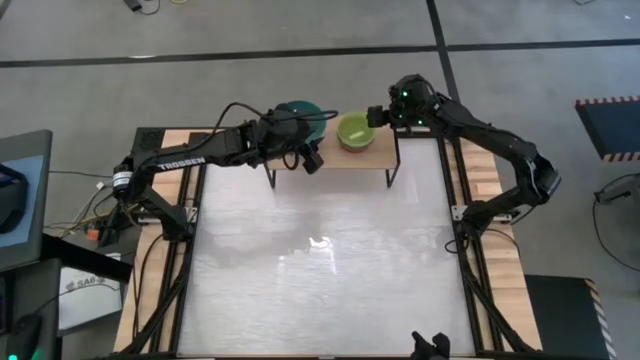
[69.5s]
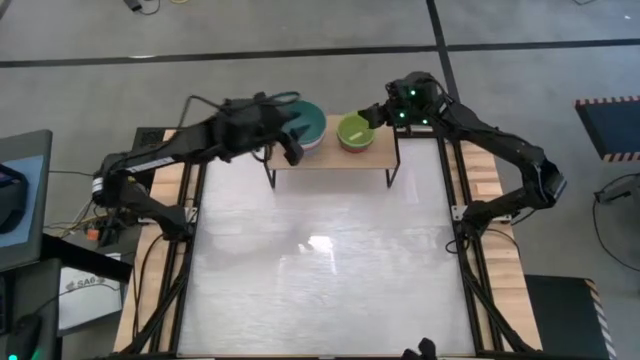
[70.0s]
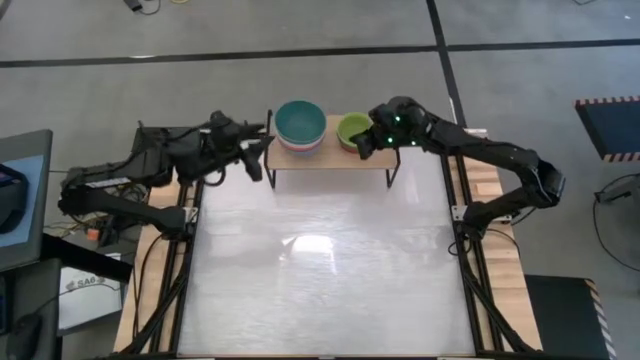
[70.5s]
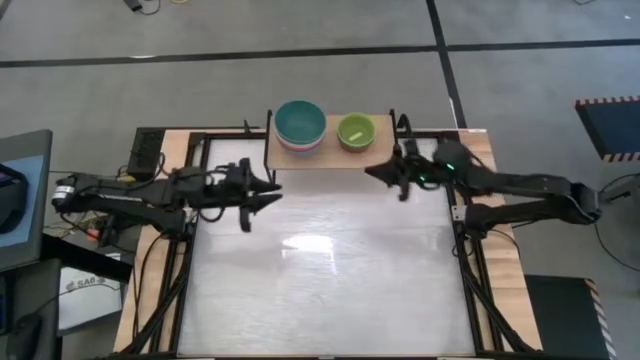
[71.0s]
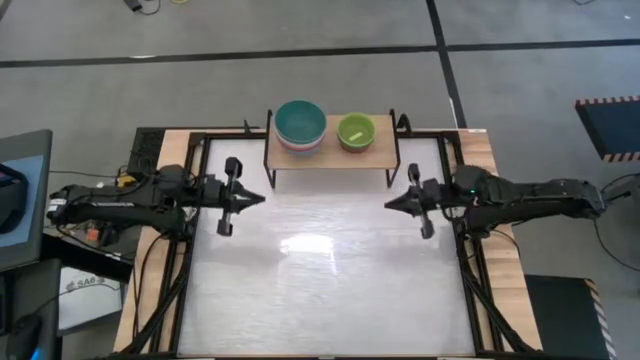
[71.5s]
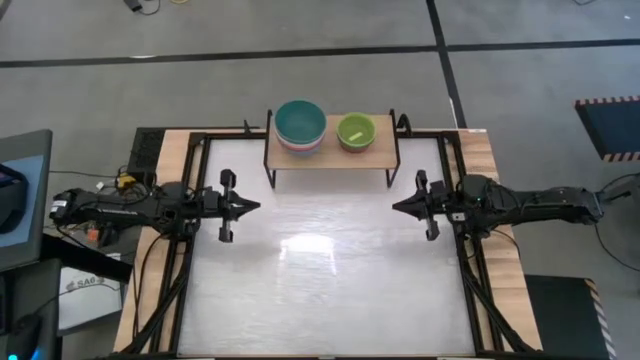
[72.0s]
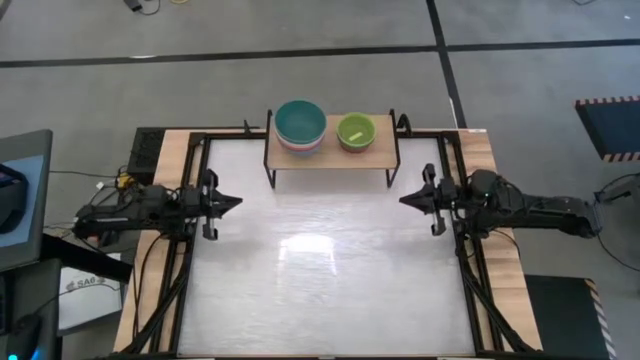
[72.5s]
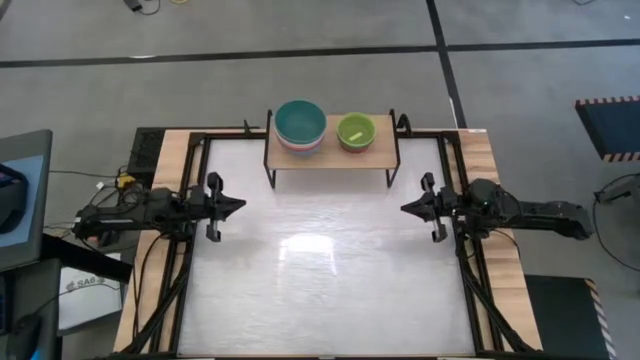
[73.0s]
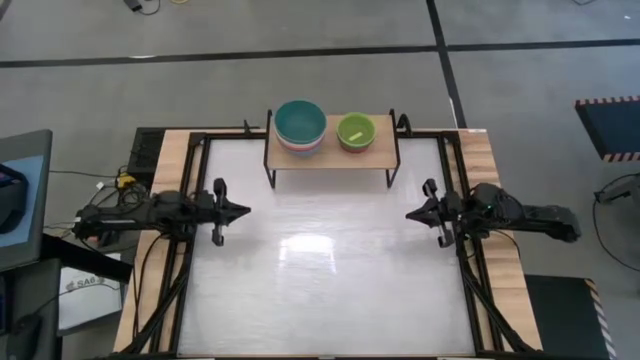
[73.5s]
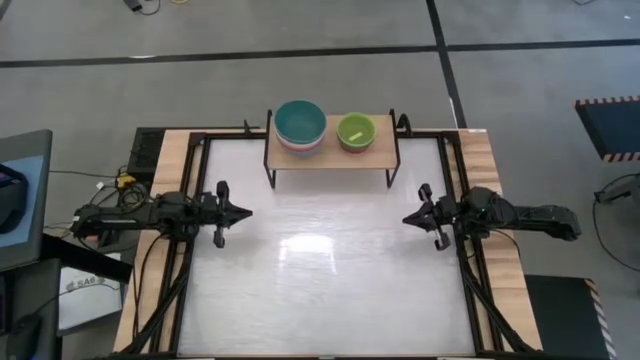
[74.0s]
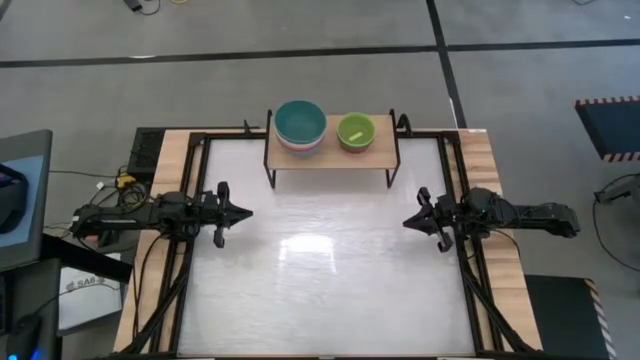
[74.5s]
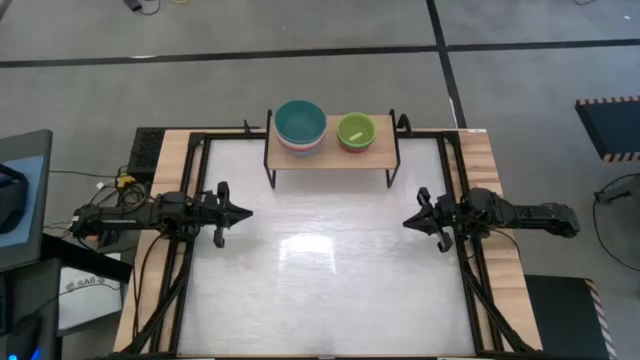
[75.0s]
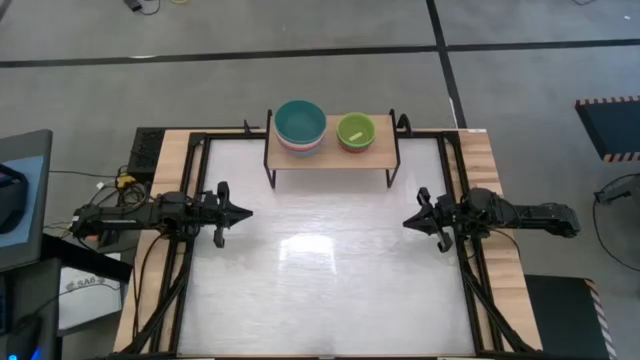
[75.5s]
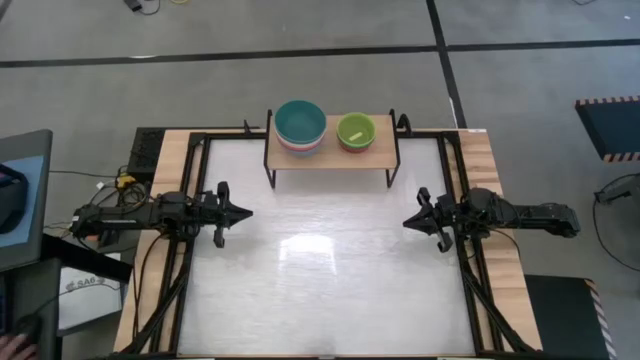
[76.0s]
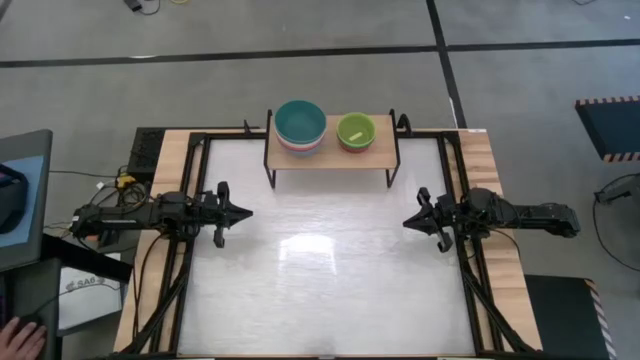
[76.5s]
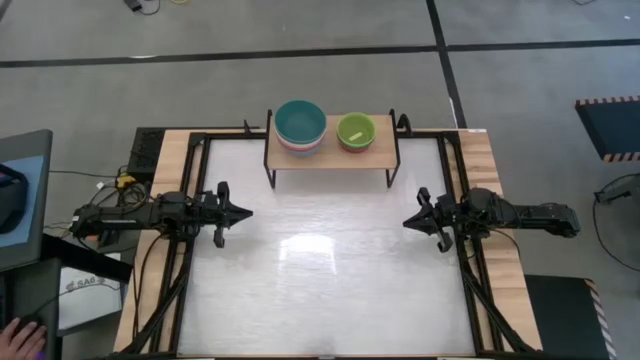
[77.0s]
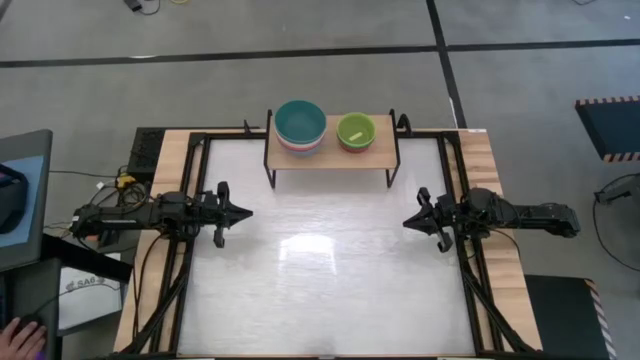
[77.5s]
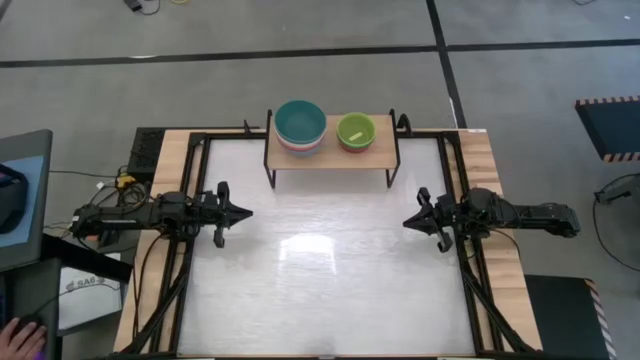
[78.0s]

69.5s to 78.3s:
Task: Place and stack bowls onto a shelf
Return to Home Position

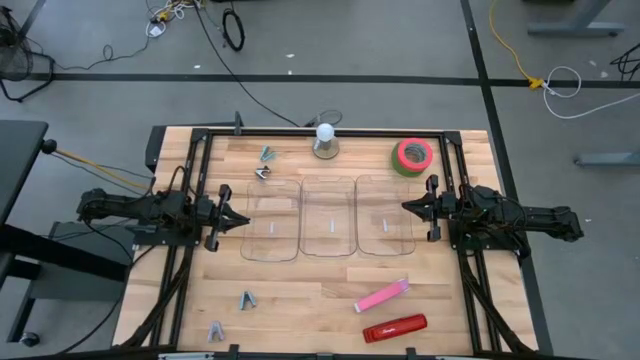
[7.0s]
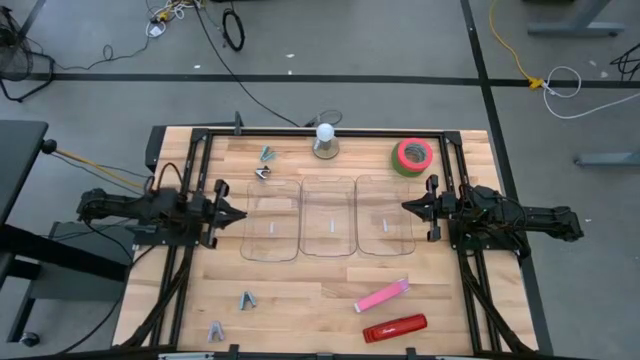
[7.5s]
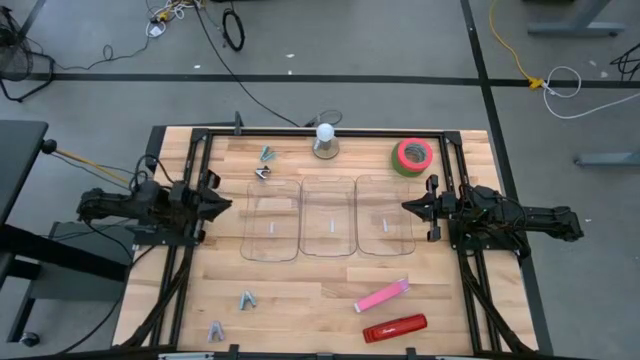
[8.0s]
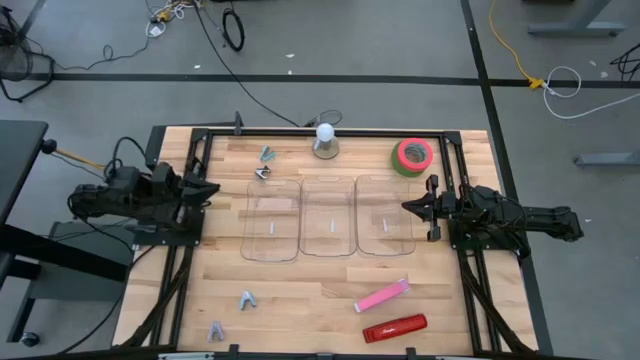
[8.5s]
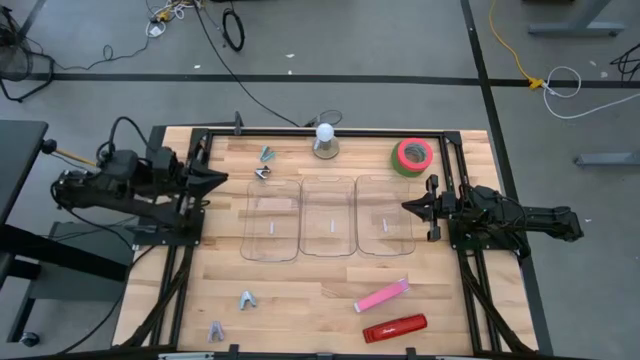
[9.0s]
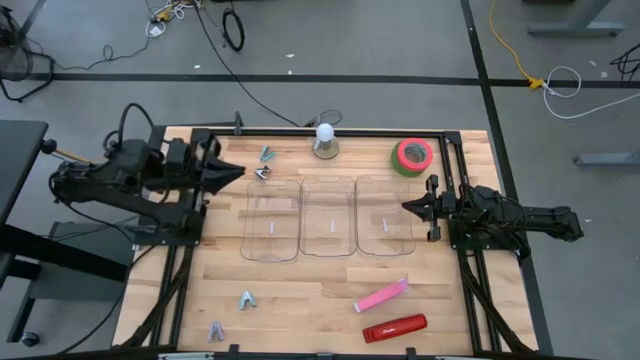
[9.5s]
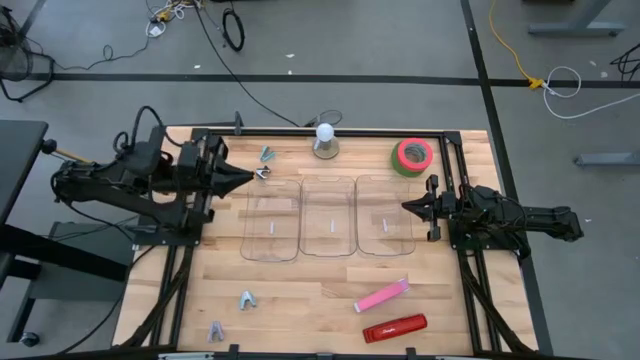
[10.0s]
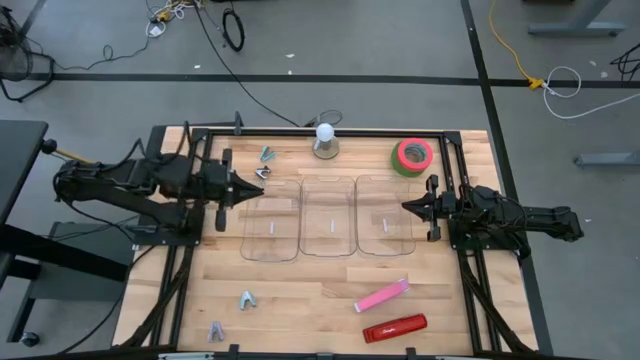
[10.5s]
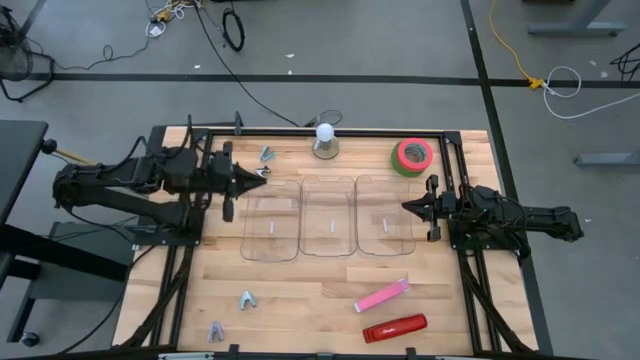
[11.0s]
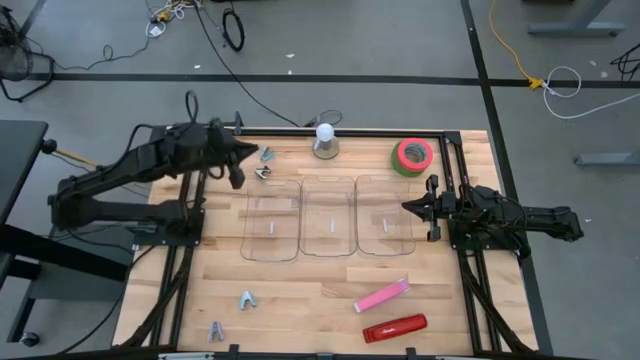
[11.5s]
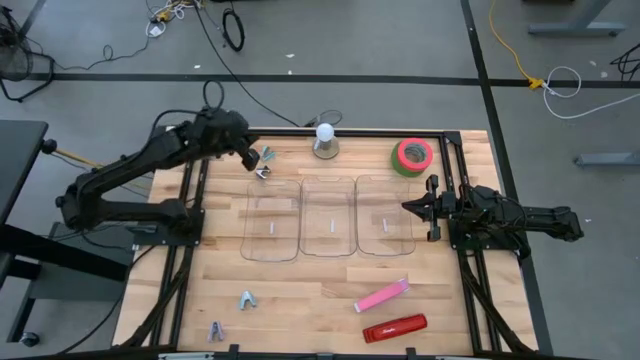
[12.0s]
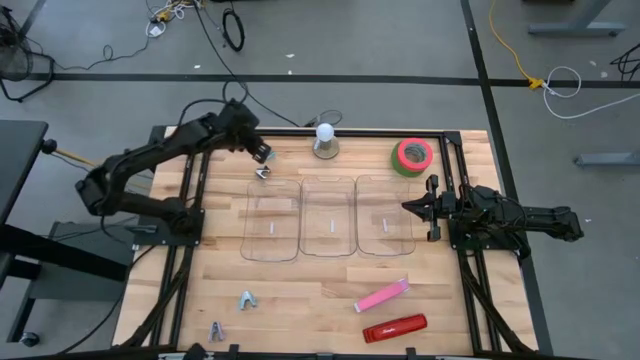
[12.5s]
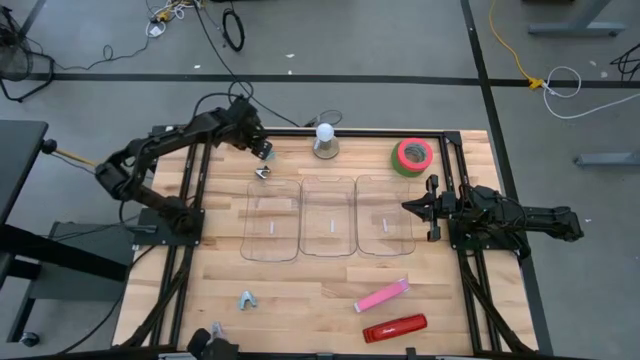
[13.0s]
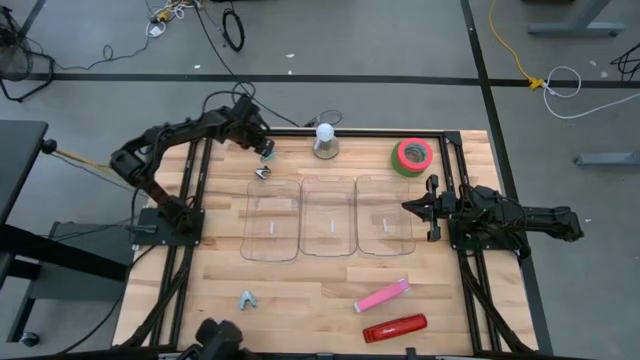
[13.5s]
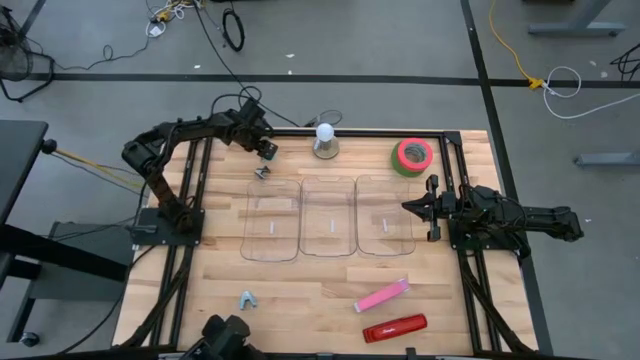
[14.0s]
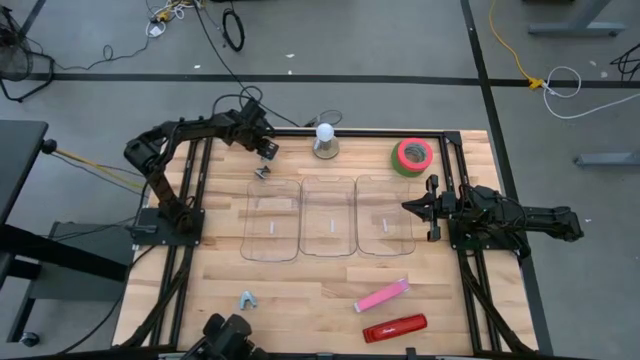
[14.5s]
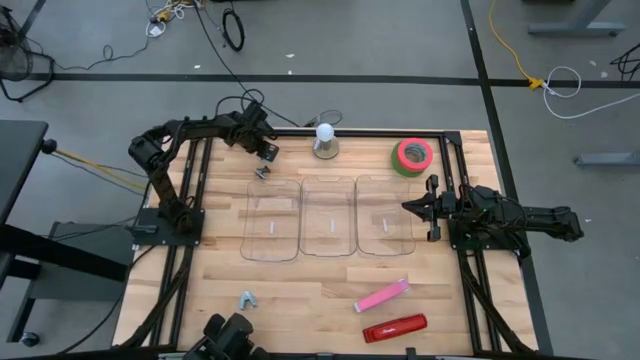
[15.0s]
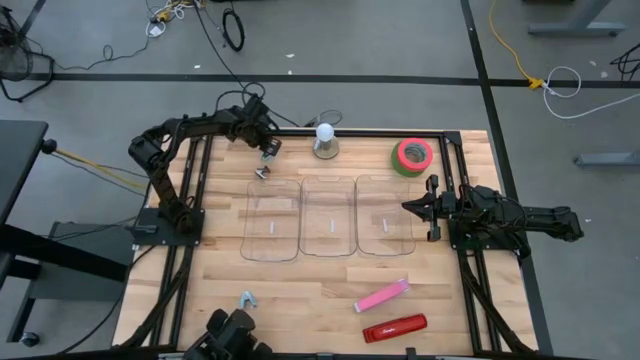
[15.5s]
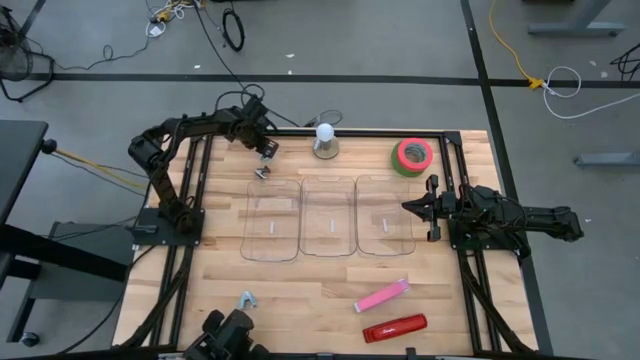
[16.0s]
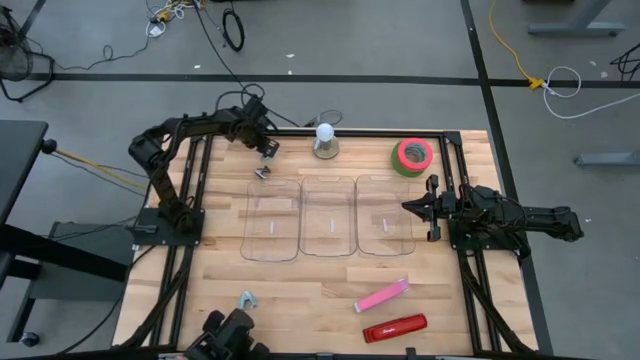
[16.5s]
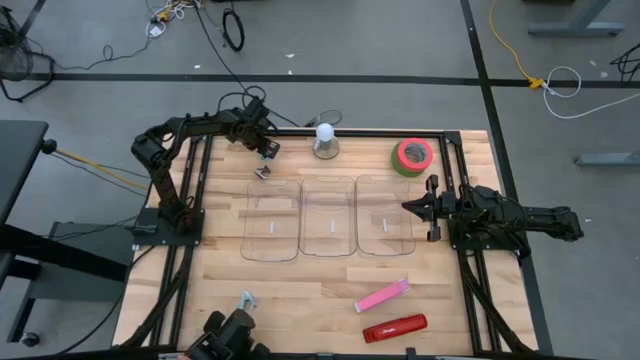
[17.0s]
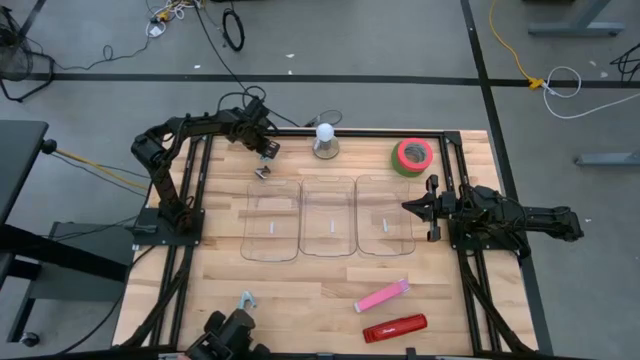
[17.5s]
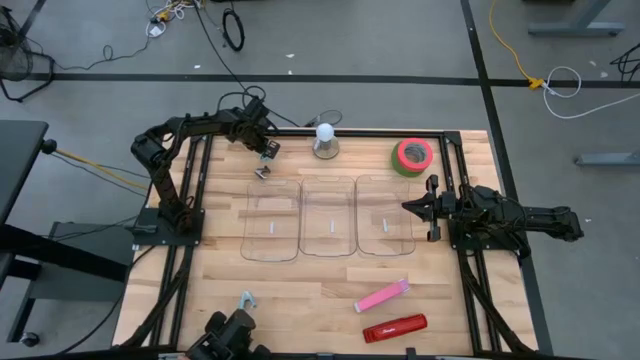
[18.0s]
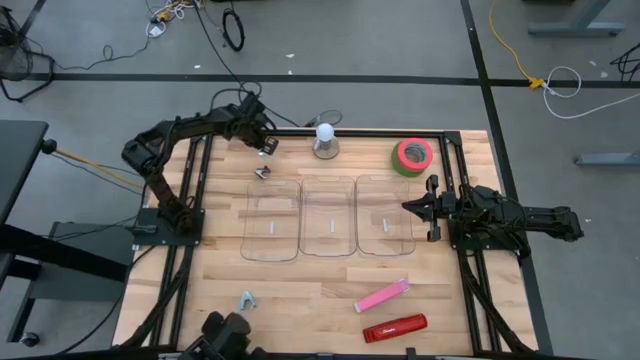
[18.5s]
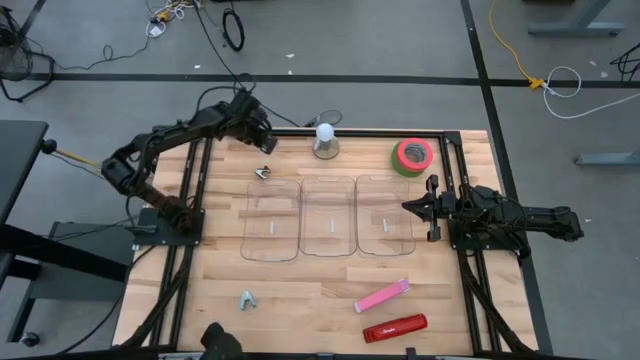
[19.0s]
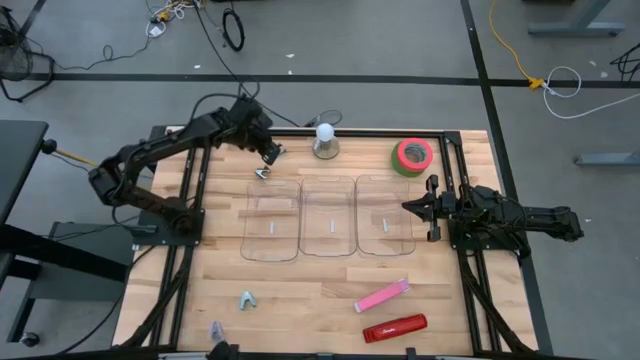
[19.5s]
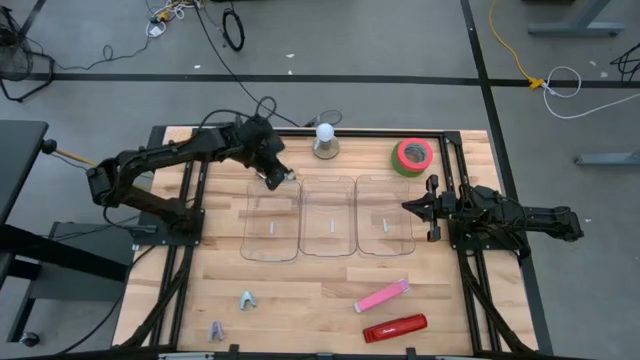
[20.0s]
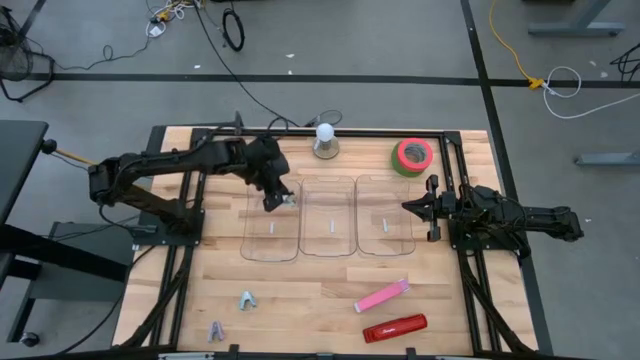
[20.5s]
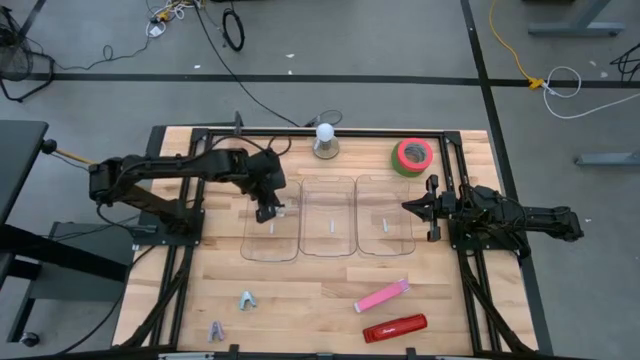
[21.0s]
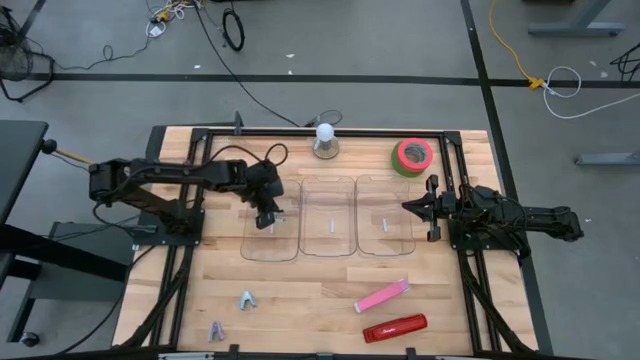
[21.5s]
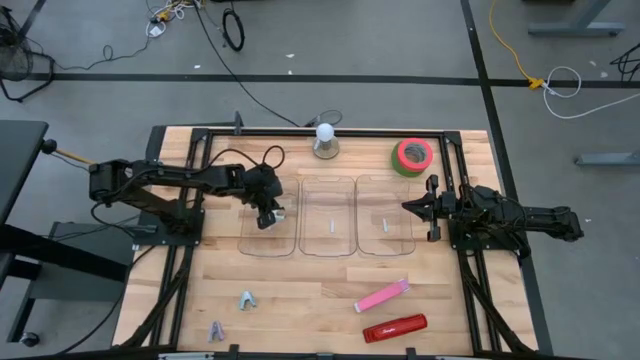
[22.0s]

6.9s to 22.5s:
Task: Pick and place Stapler, Stapler remover, tape
Put the top blue staple remover into the left transparent bin
